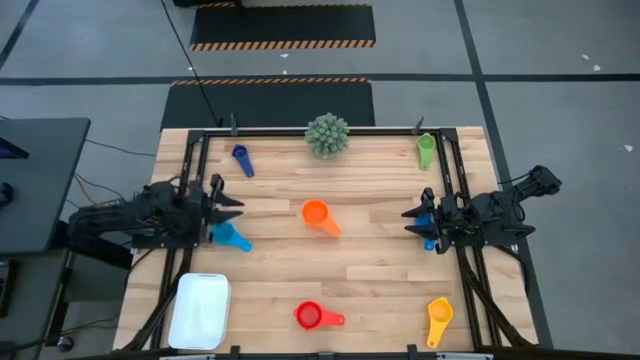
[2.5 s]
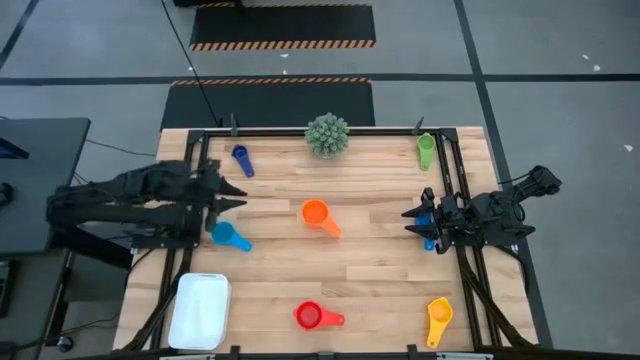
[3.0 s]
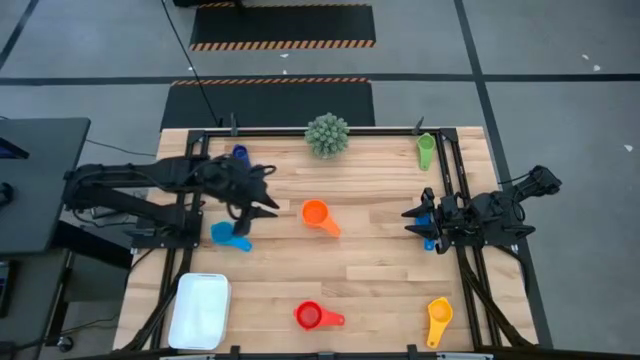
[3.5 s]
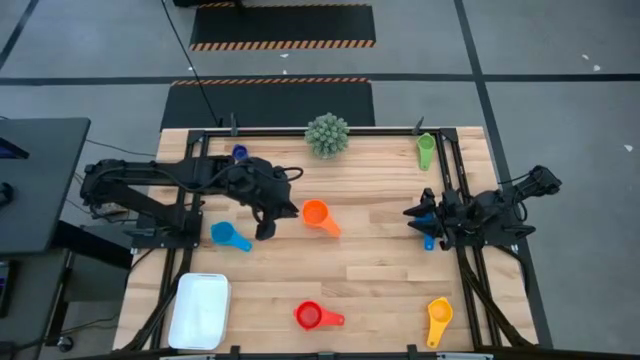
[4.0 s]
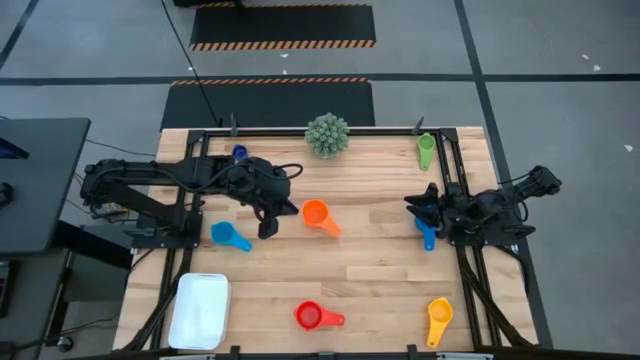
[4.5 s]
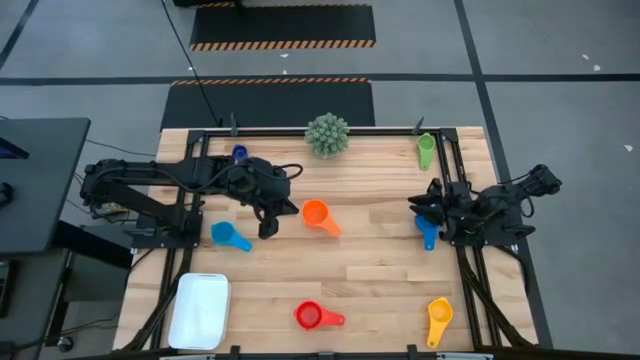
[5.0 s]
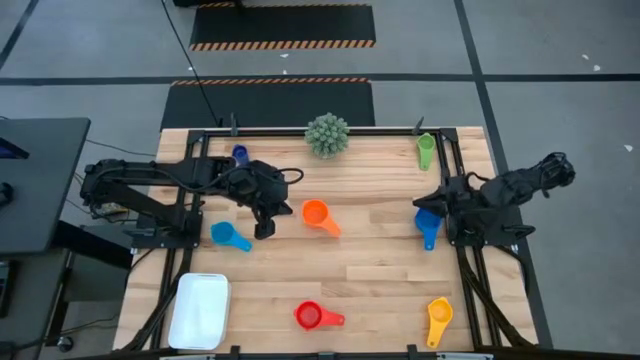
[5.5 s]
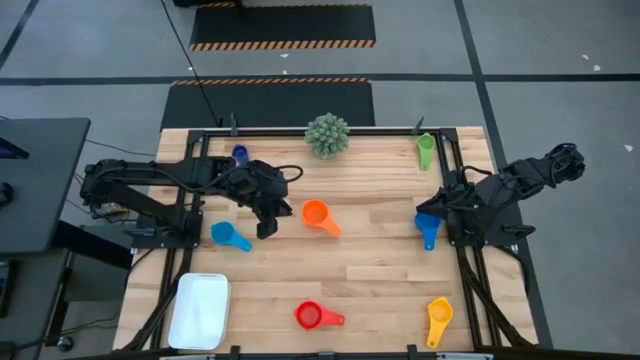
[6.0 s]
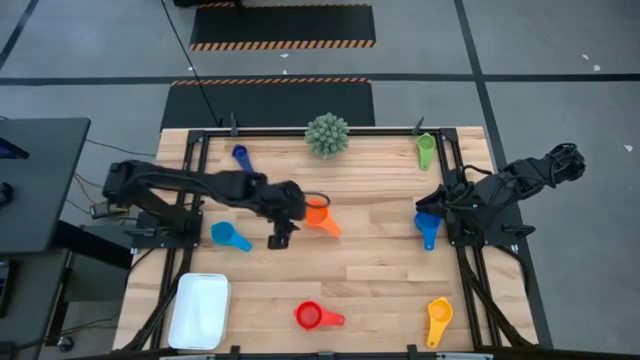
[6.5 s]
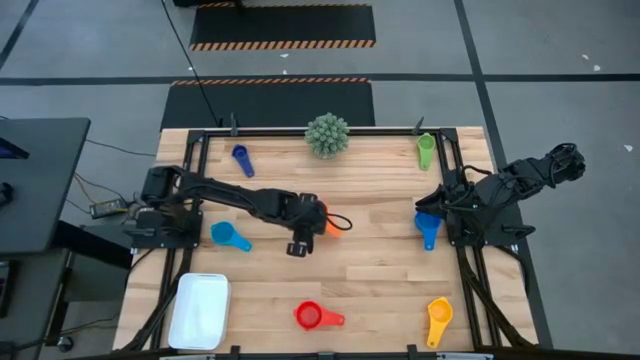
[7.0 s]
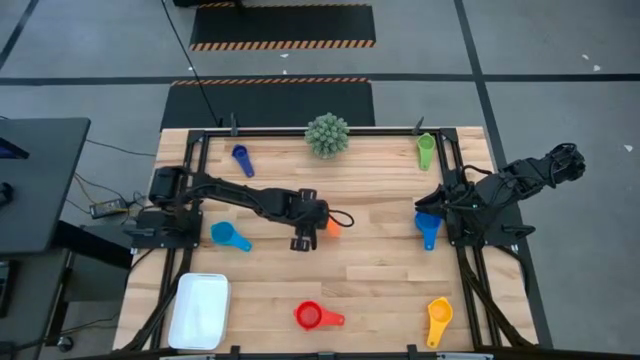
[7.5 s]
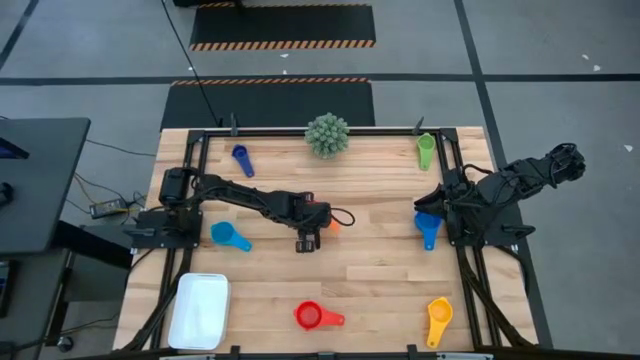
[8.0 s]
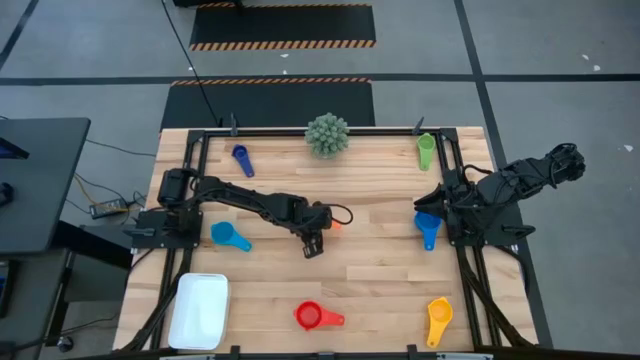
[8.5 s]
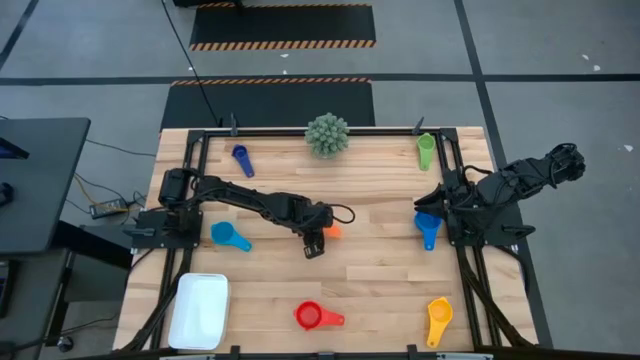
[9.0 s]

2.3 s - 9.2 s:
Task: Nest measuring cups in basket
Adjust the orange measuring cup

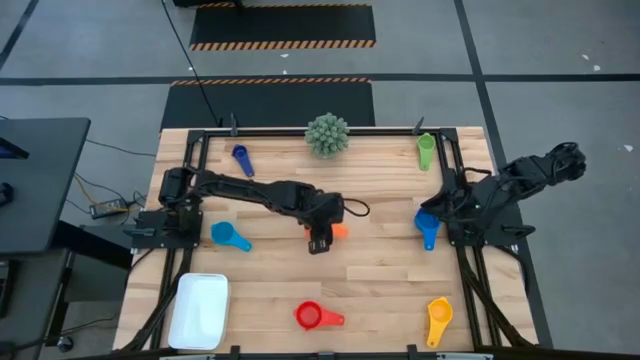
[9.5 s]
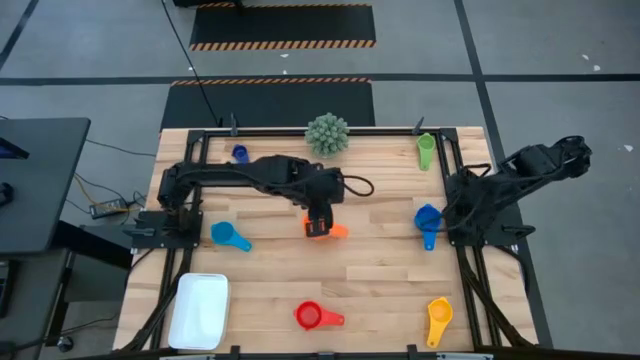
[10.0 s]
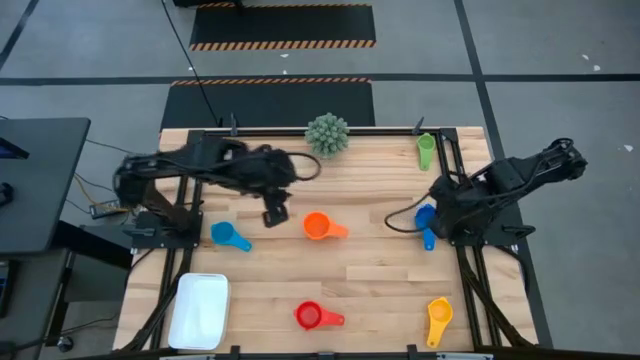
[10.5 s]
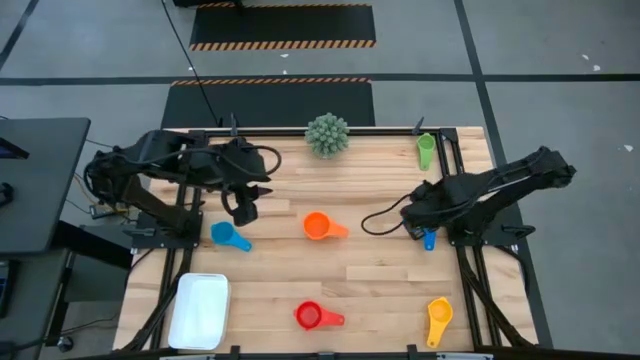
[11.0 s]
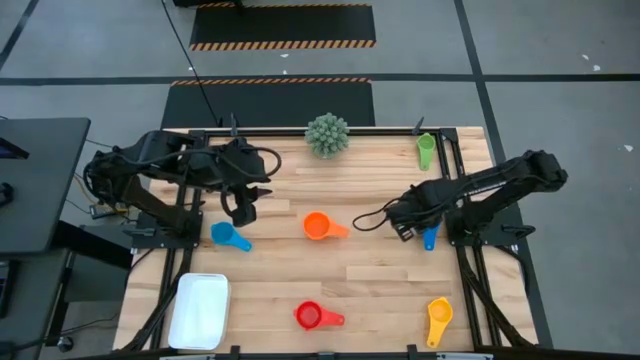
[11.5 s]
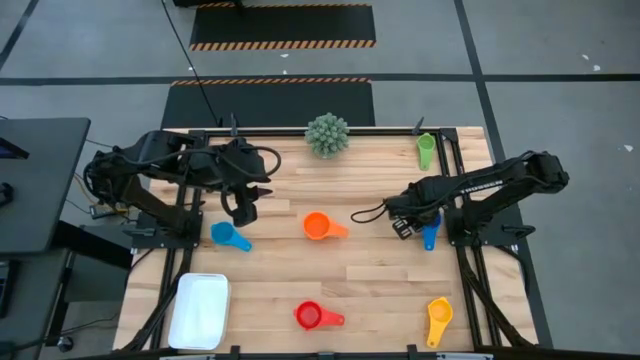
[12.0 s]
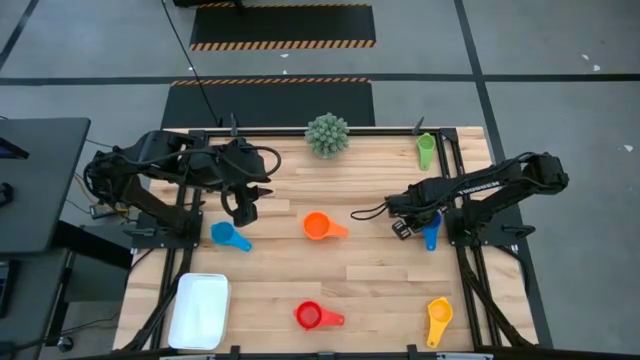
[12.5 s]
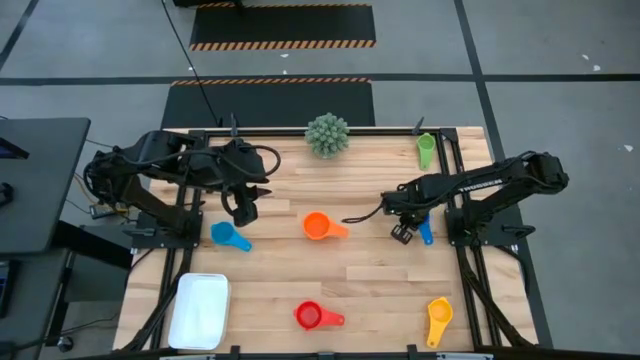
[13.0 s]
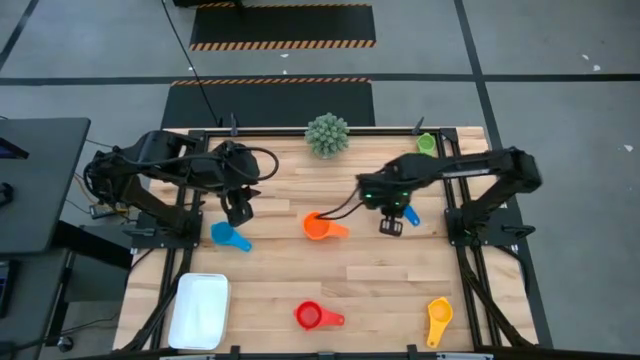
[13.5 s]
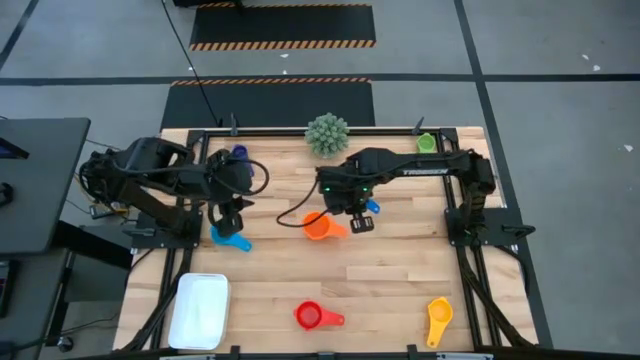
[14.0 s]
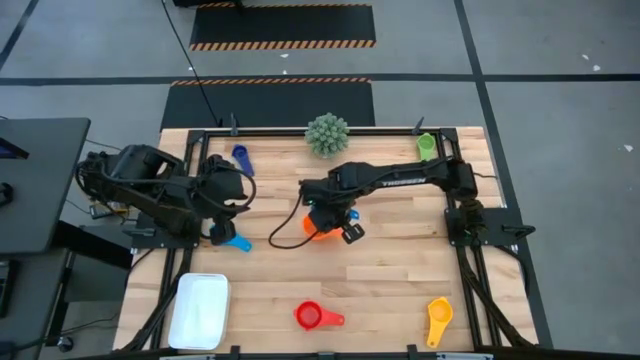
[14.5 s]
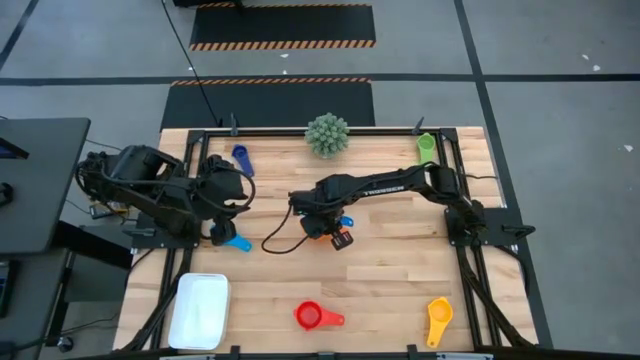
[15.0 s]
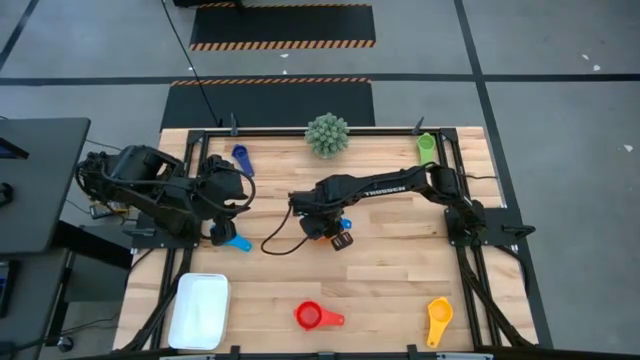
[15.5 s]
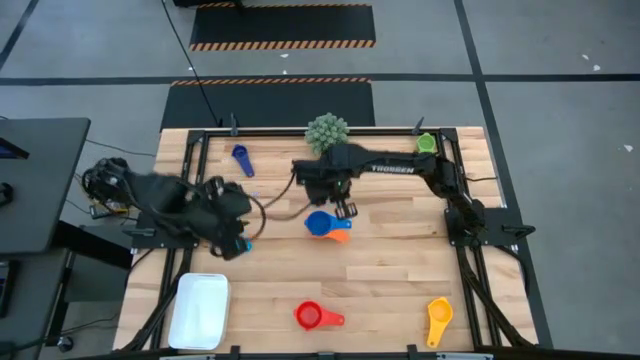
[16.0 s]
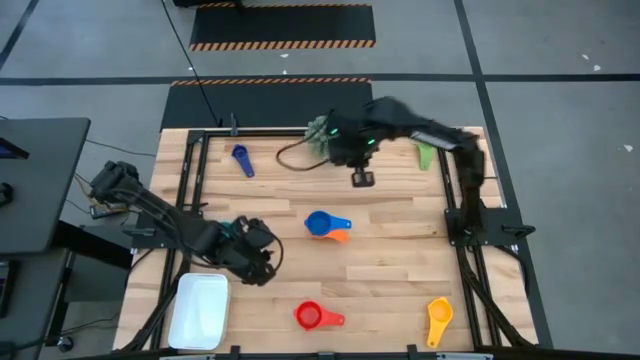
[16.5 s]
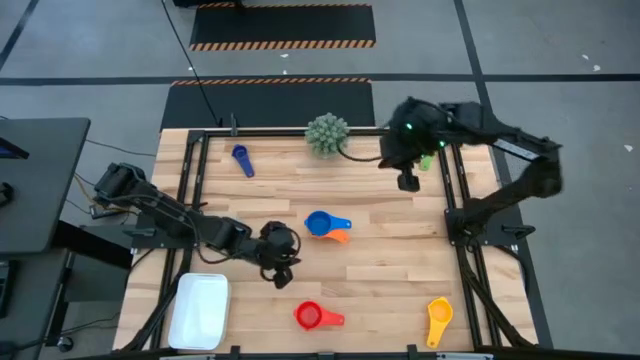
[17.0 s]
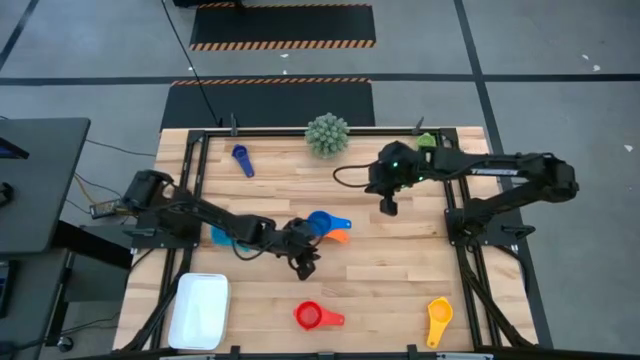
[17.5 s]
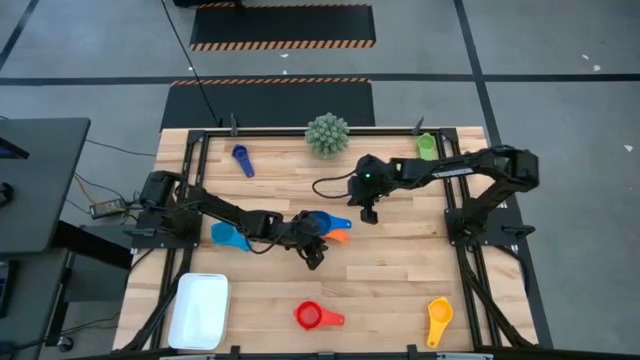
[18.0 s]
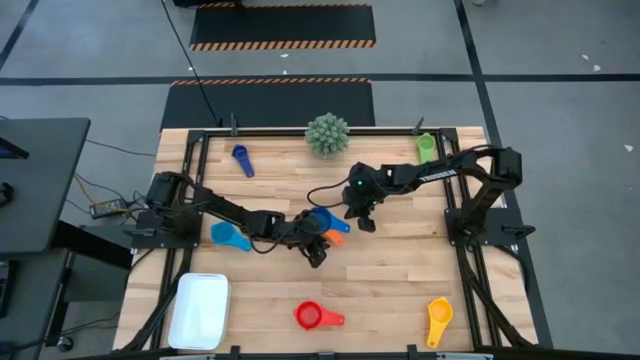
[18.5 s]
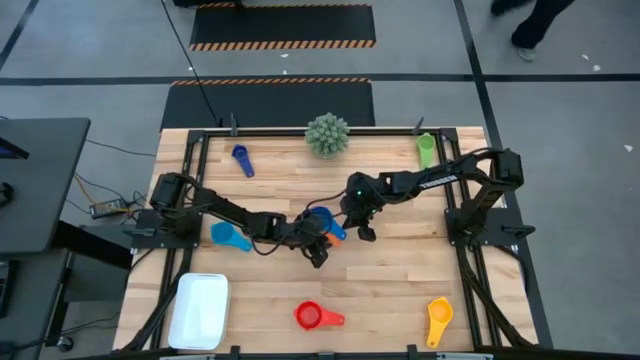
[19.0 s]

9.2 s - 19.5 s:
Stack the blue measuring cup on top of the orange measuring cup

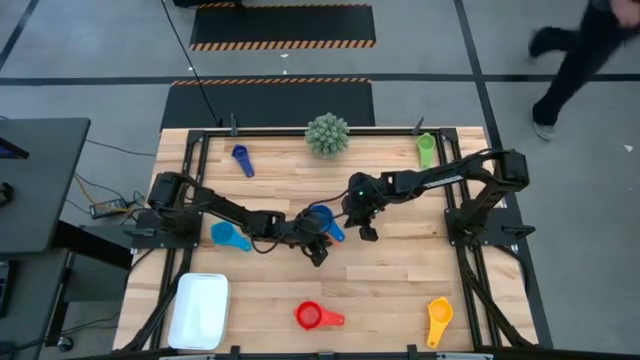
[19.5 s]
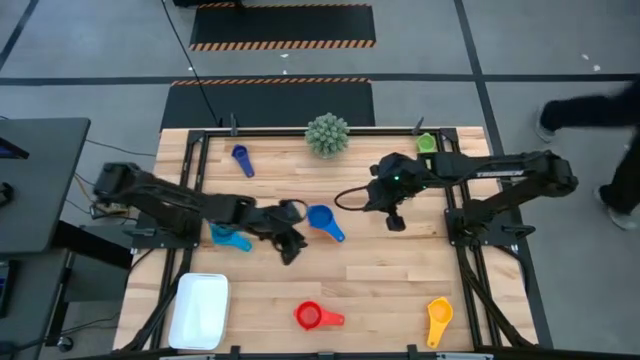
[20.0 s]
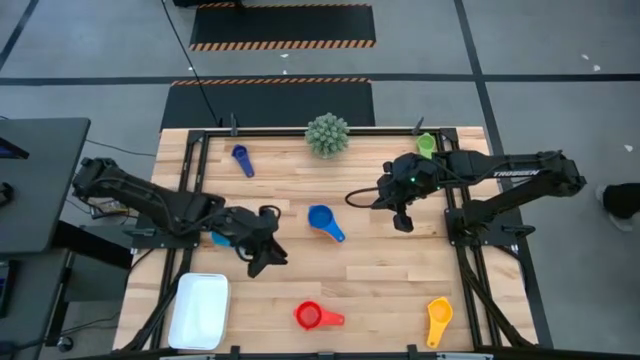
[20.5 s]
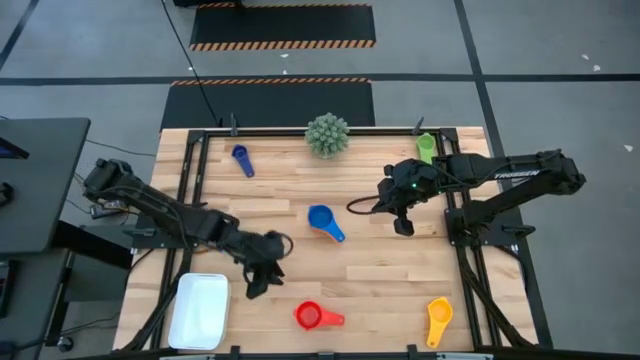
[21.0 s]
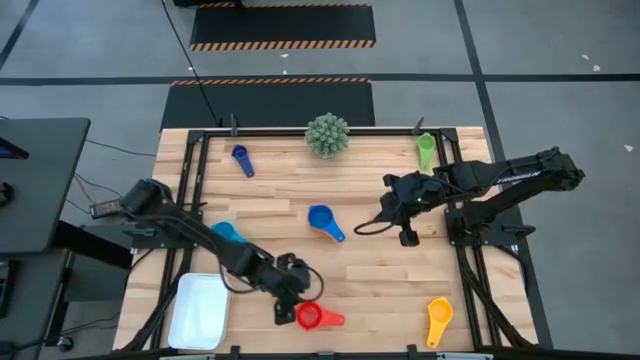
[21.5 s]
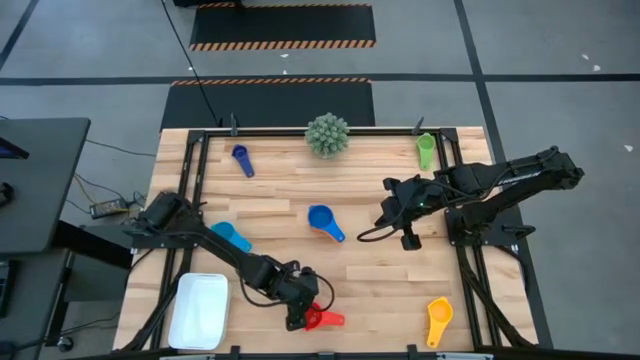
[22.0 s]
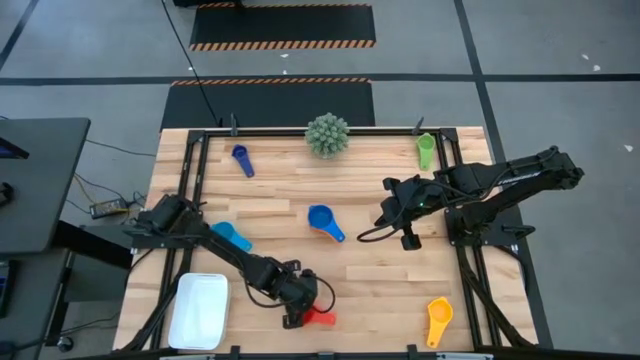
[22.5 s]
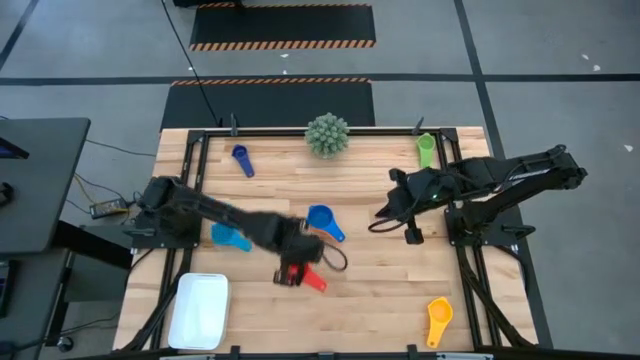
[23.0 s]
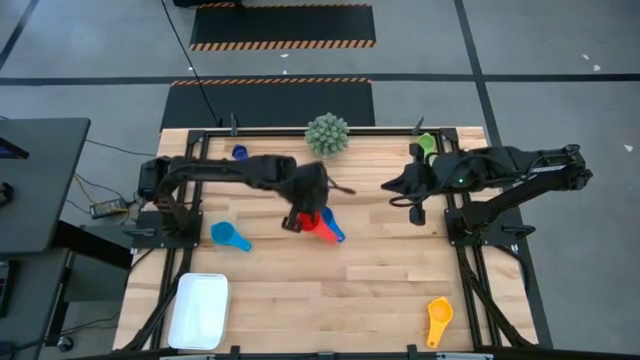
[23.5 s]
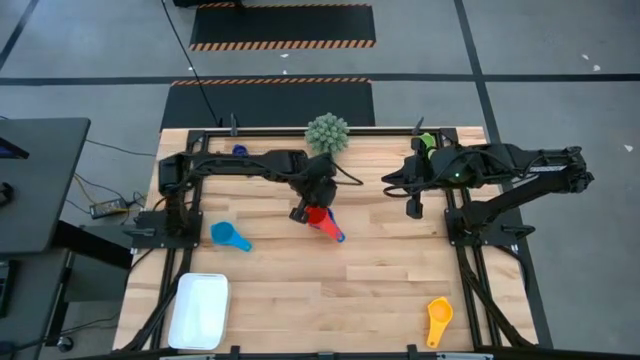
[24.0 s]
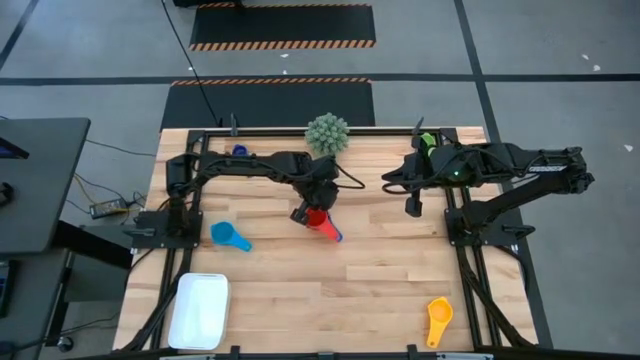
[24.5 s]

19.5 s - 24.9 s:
Stack the red measuring cup on top of the blue measuring cup
